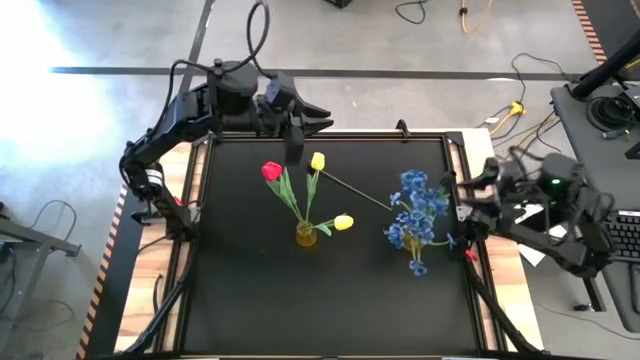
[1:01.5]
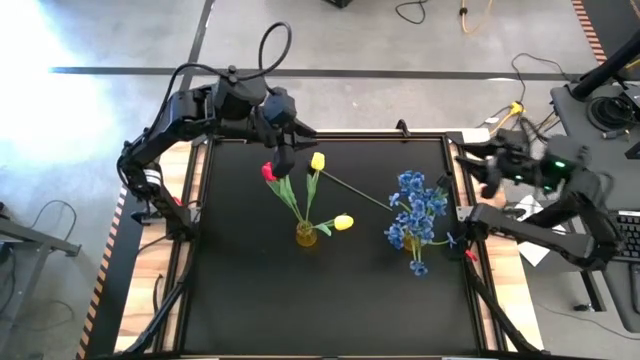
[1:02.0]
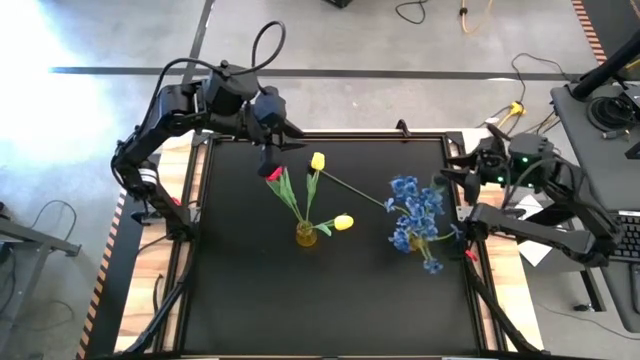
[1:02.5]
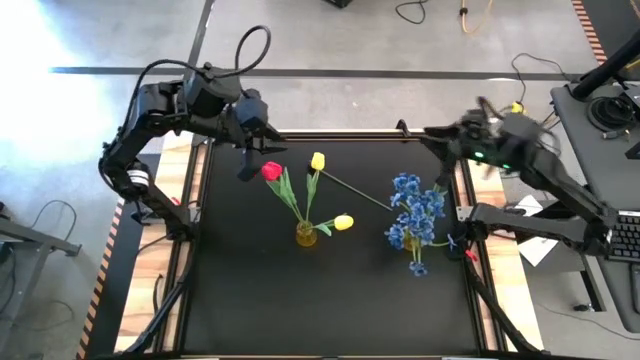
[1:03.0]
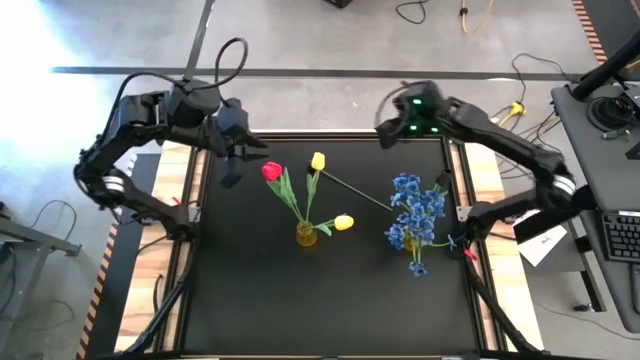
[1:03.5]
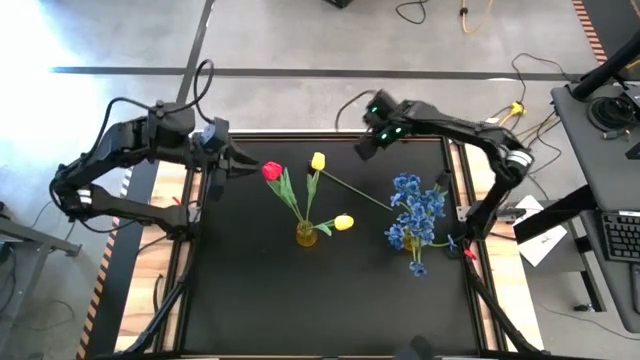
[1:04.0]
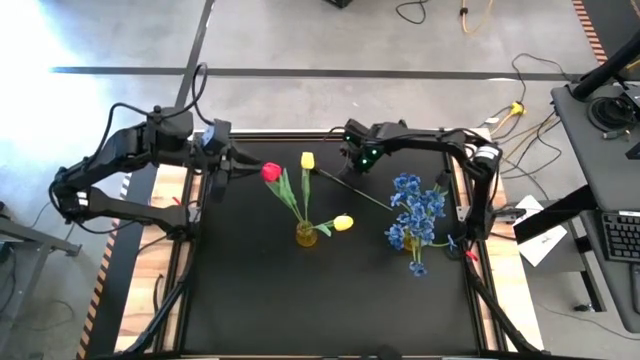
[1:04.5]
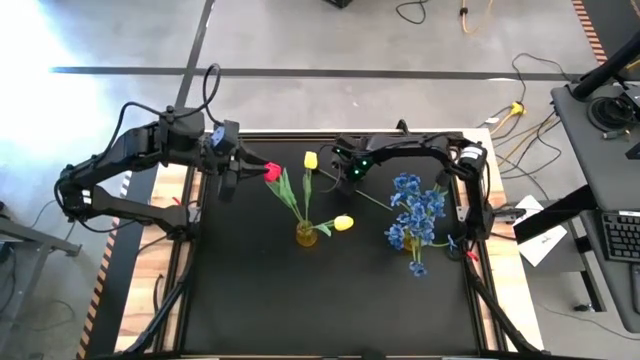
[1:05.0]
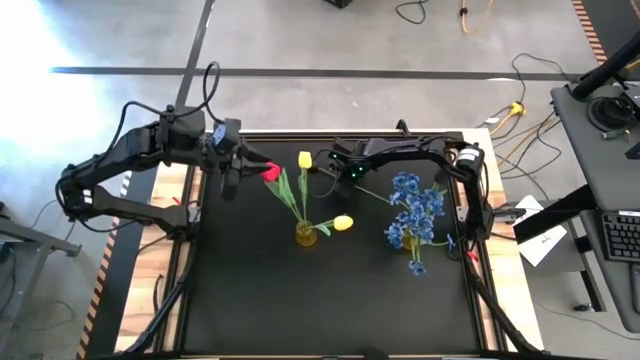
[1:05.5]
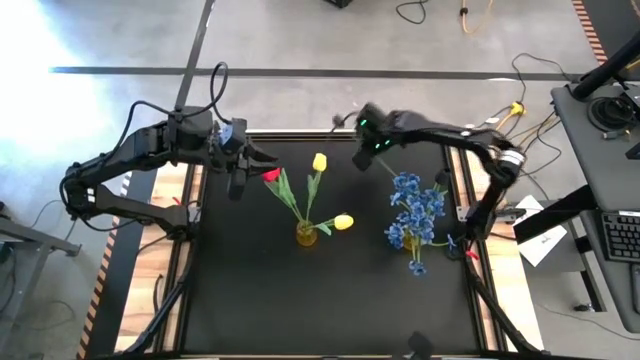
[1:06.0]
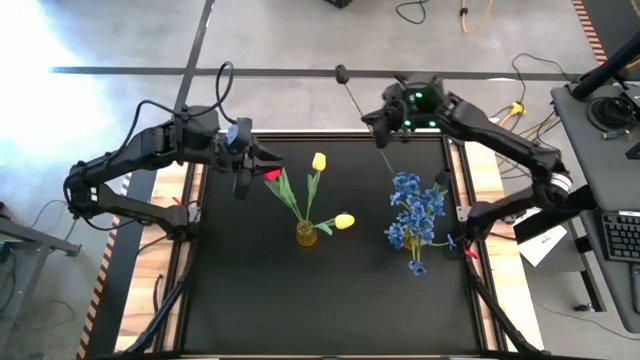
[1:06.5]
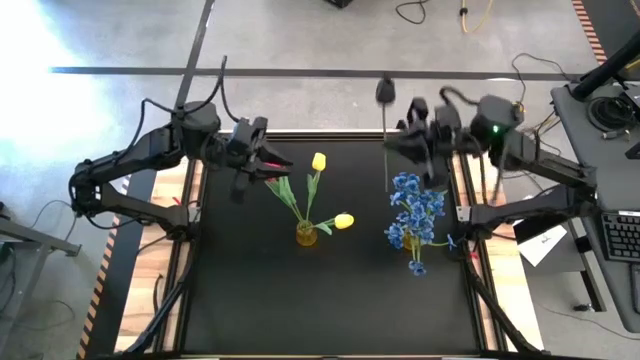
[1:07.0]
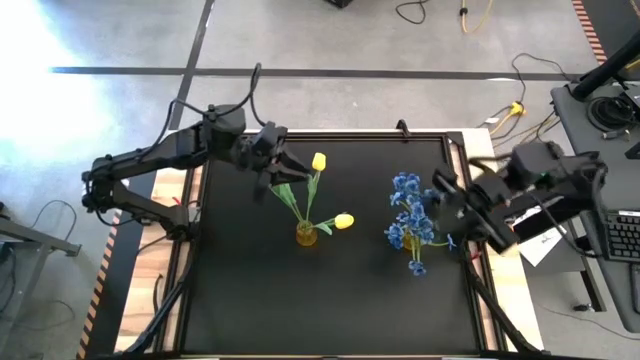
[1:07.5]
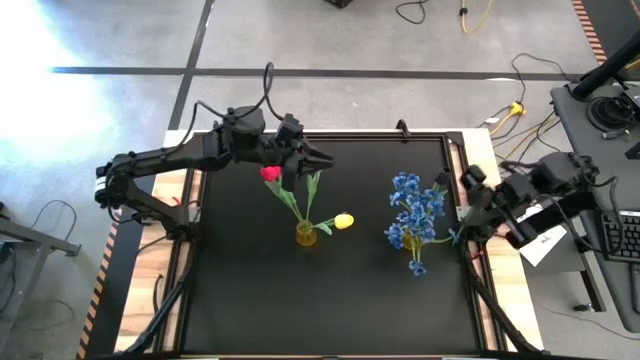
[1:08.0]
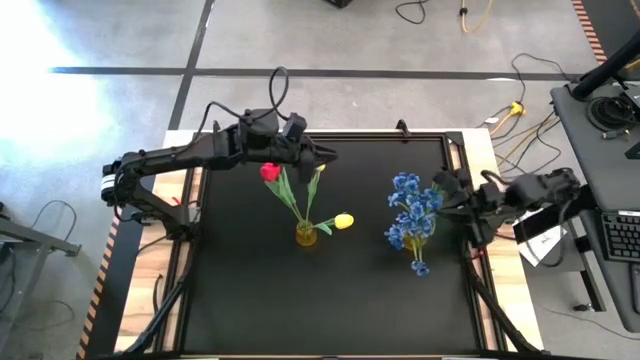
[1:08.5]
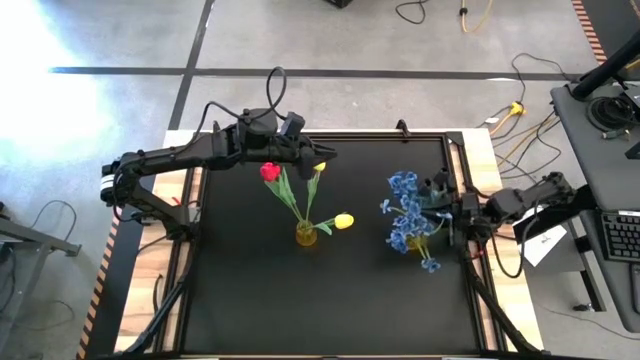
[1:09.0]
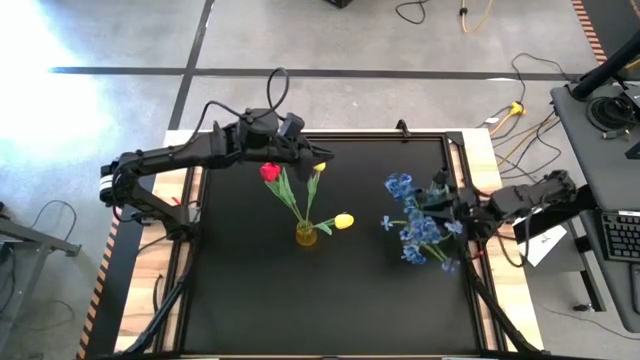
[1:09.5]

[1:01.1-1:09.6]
Task: Sort flowers into vase by color
Put the black flower into the right yellow vase

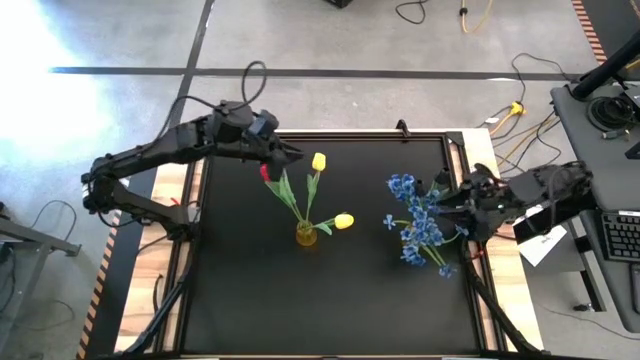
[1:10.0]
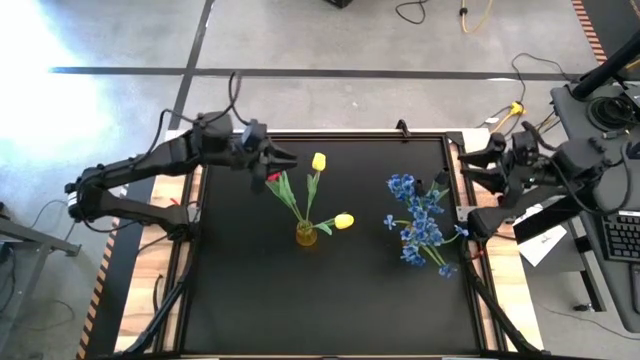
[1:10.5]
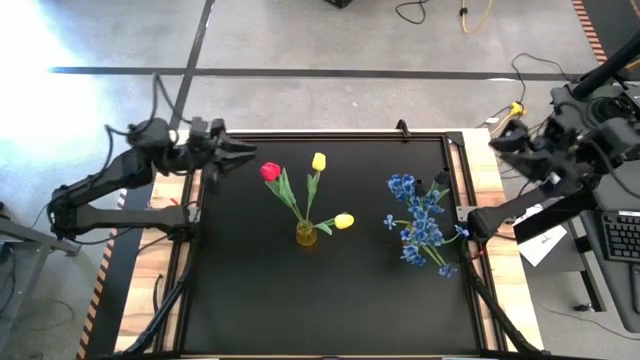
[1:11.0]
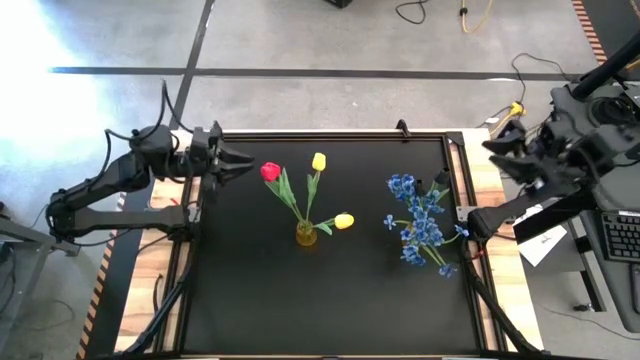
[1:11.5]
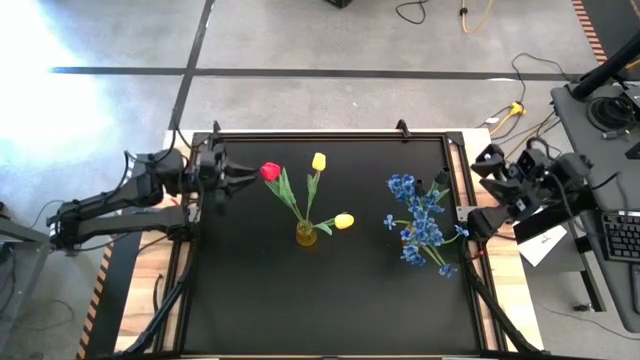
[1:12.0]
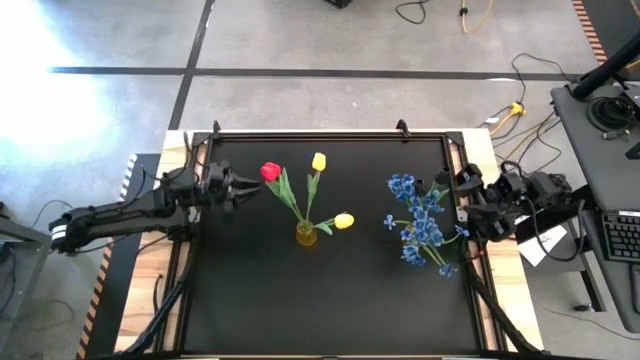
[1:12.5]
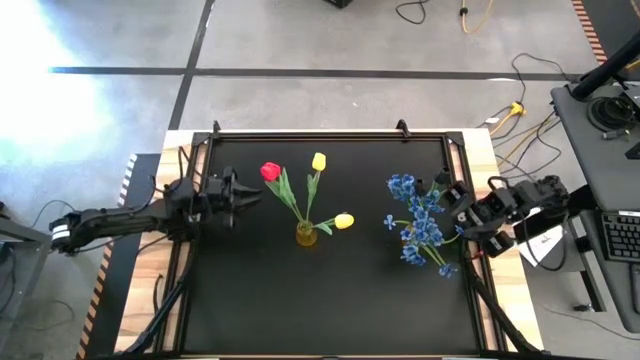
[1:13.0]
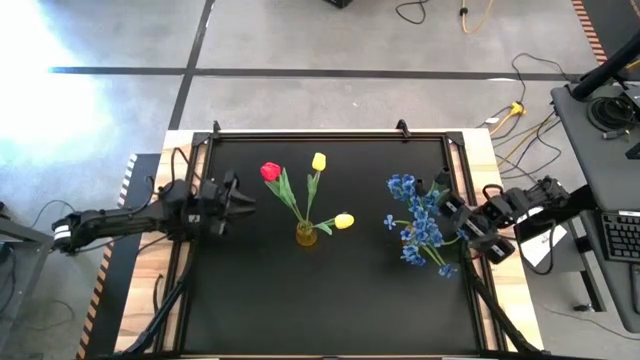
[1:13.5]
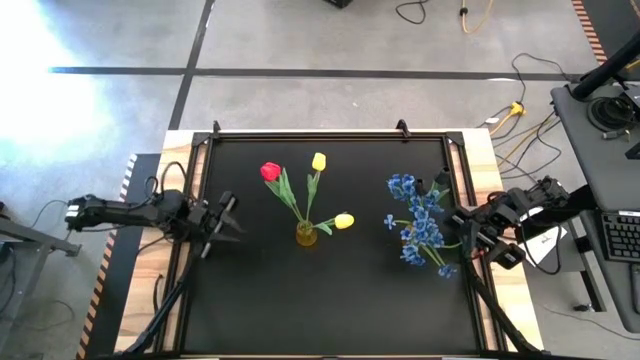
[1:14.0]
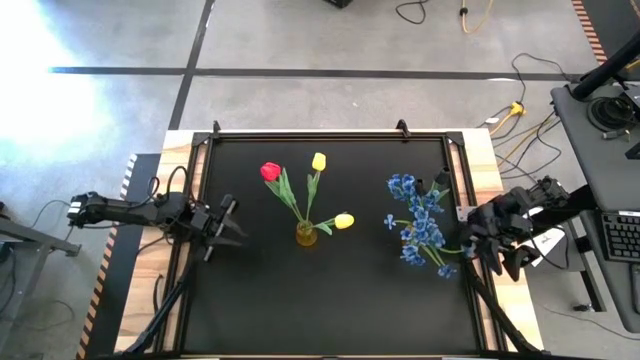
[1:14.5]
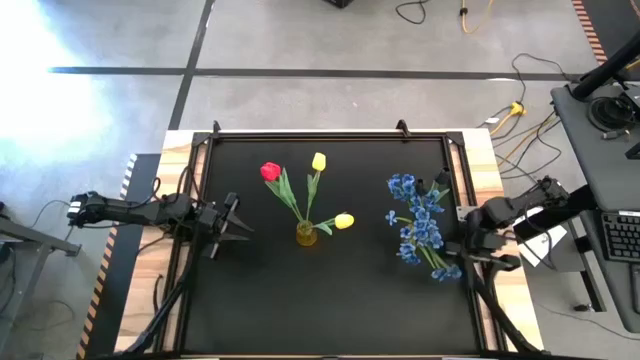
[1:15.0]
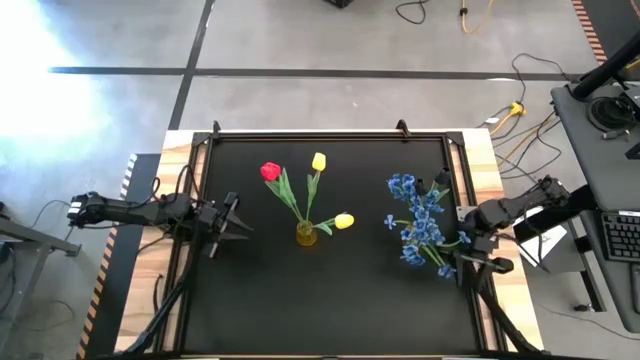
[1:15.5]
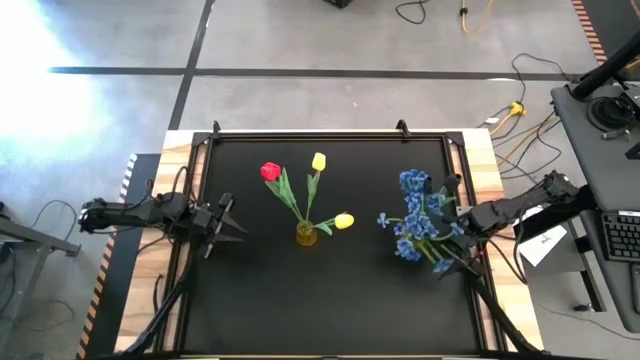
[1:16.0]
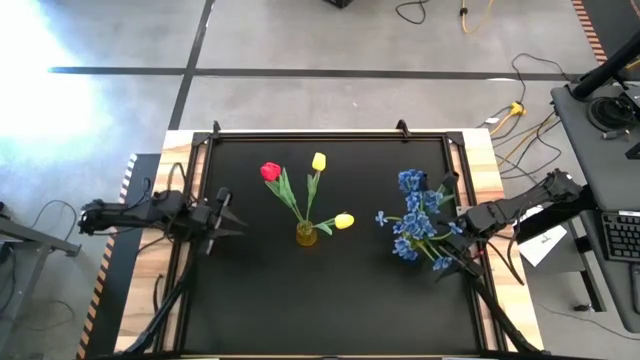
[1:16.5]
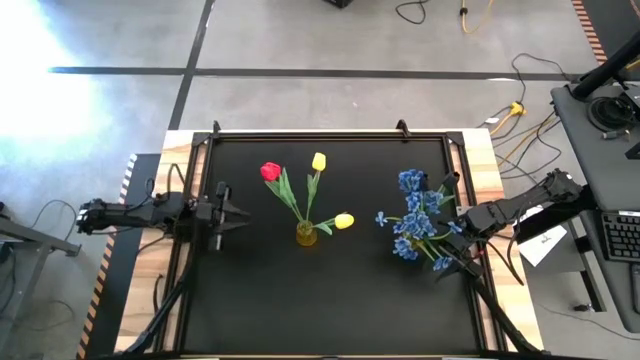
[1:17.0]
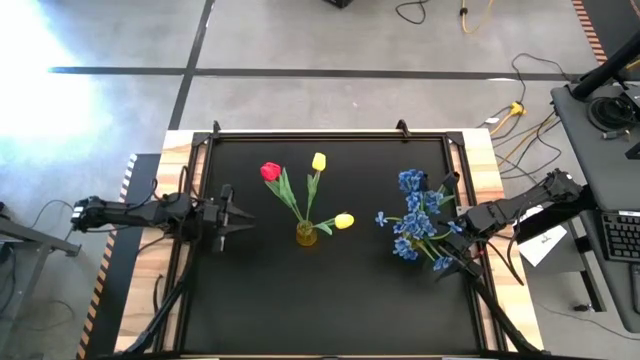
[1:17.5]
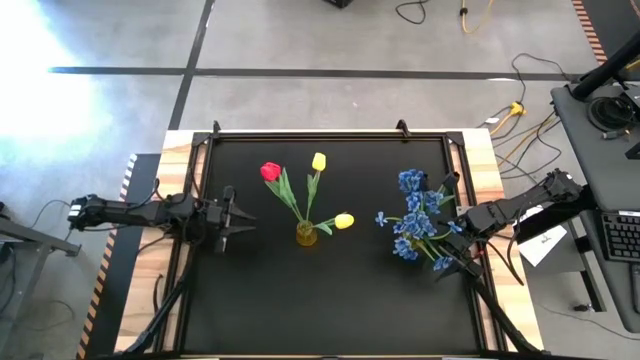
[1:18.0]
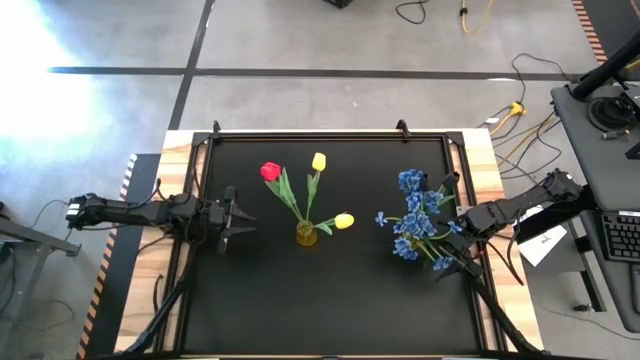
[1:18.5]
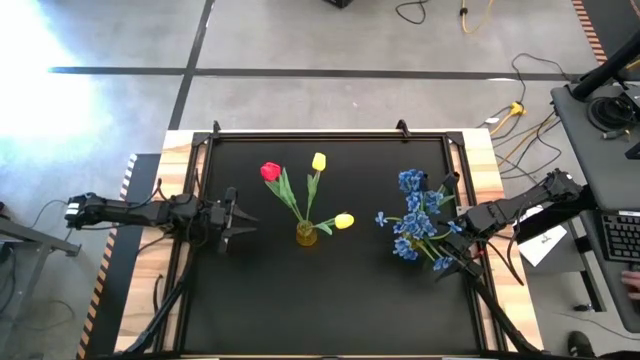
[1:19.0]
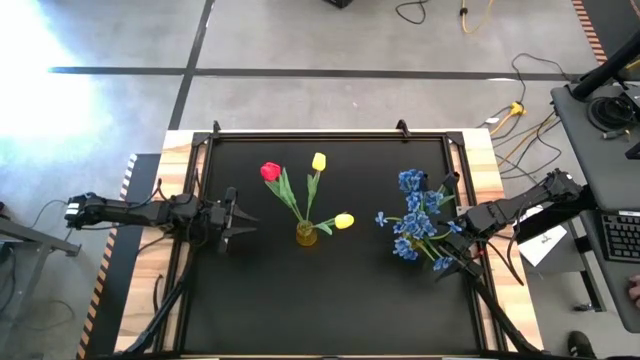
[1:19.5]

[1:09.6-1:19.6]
Return to Home Position

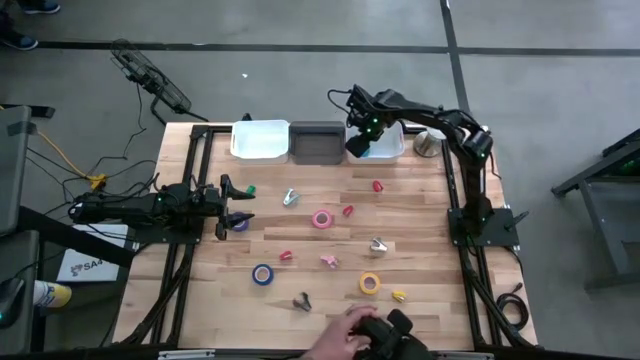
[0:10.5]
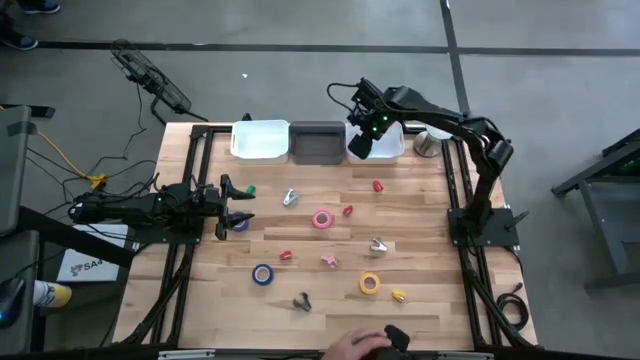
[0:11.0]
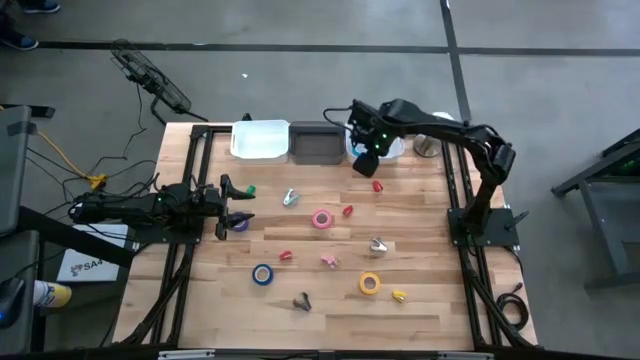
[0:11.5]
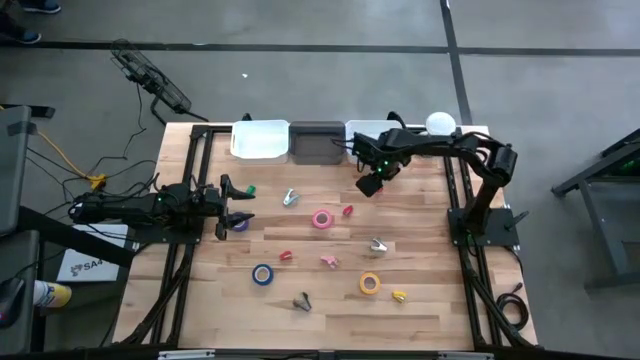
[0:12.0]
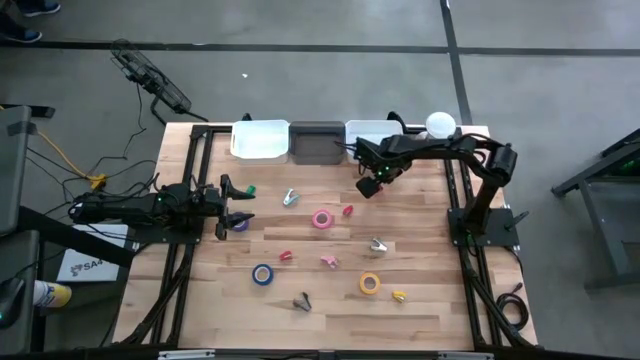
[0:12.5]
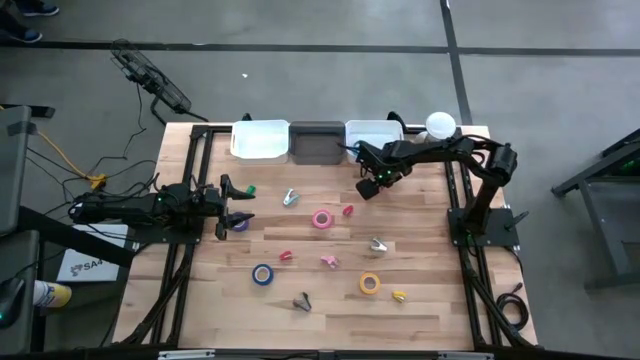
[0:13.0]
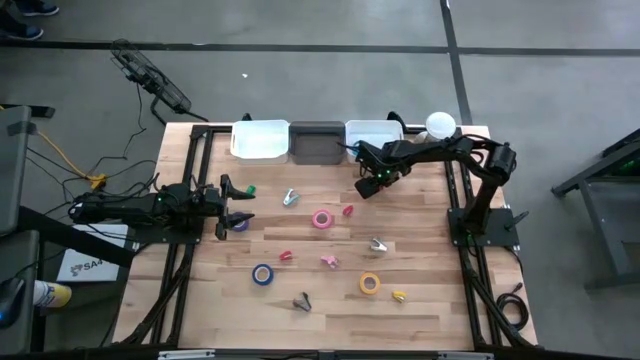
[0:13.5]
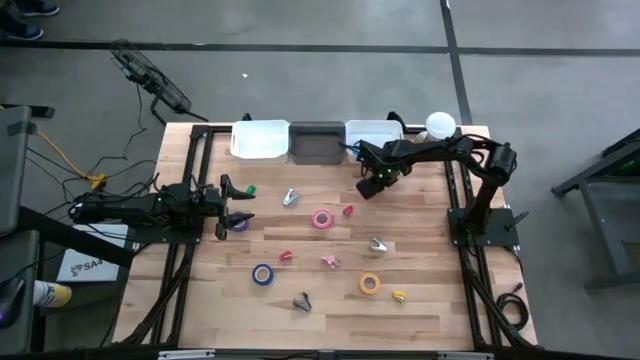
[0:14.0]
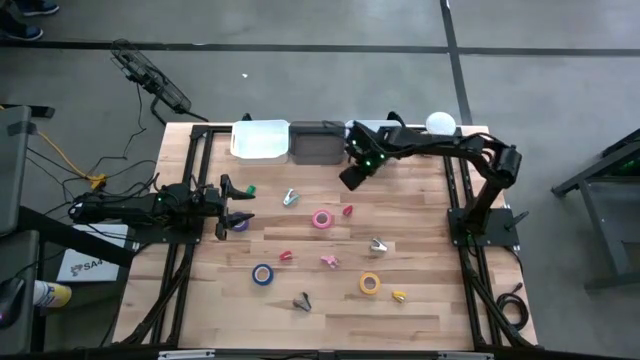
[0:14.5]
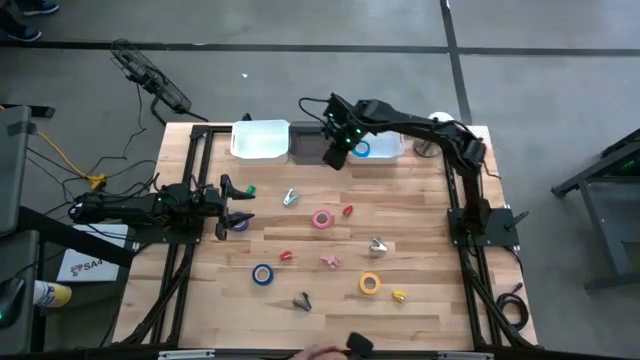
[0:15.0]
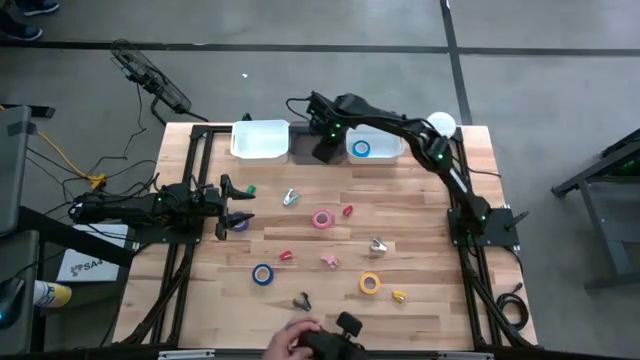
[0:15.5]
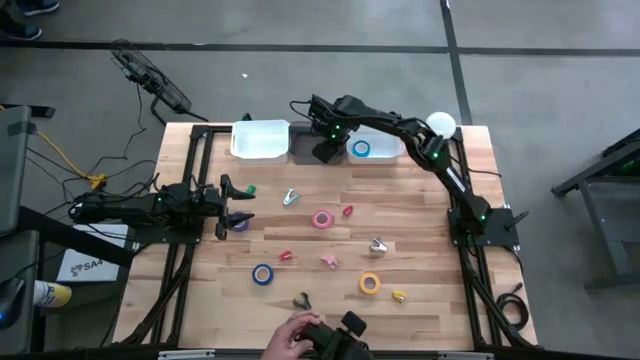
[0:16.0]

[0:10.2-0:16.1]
Task: Pick and place Stapler, Stapler remover, tape
Put the top red stapler into the black transparent bin
